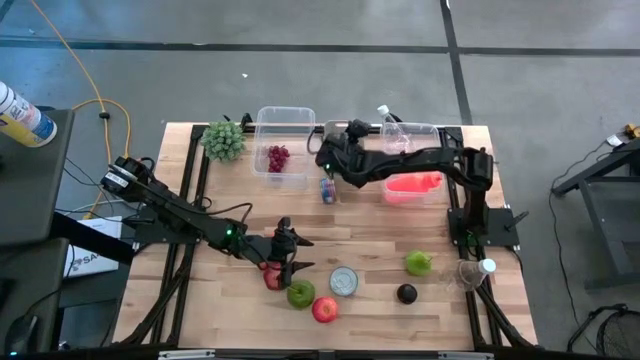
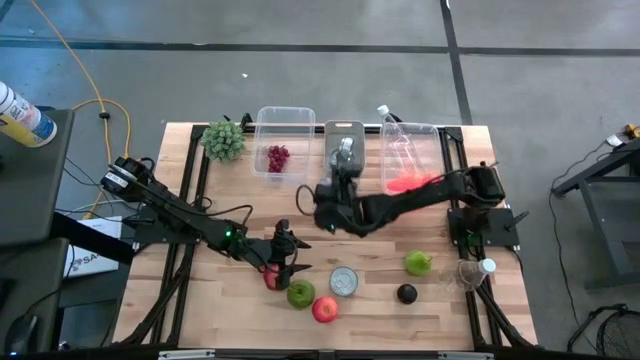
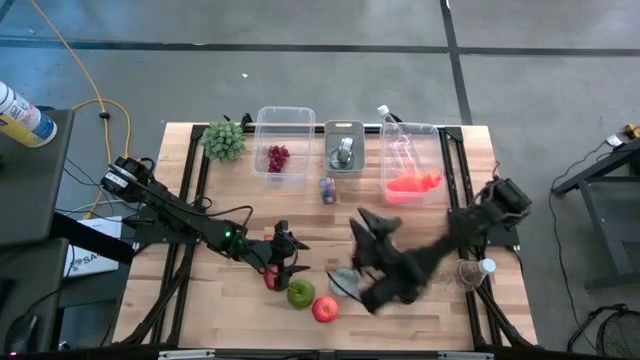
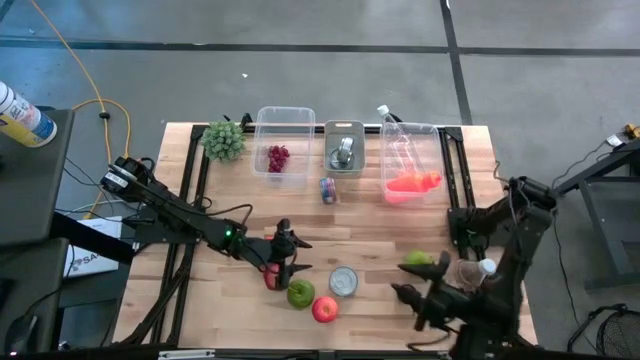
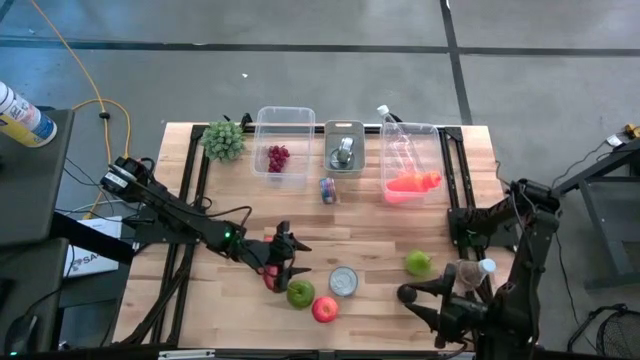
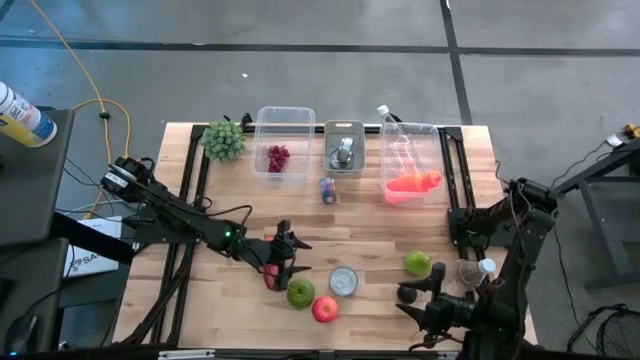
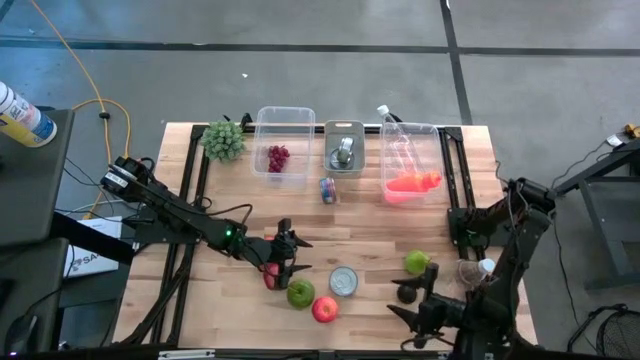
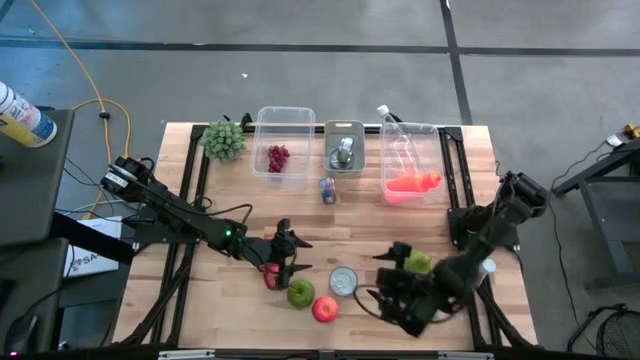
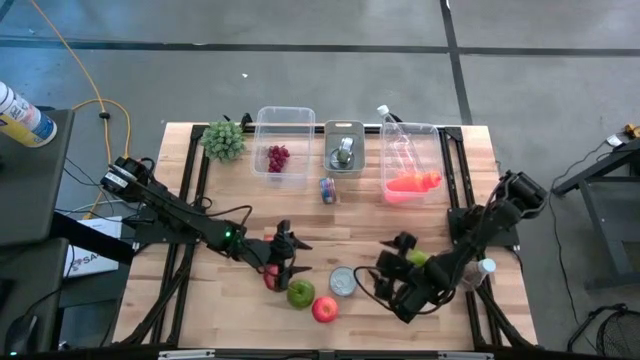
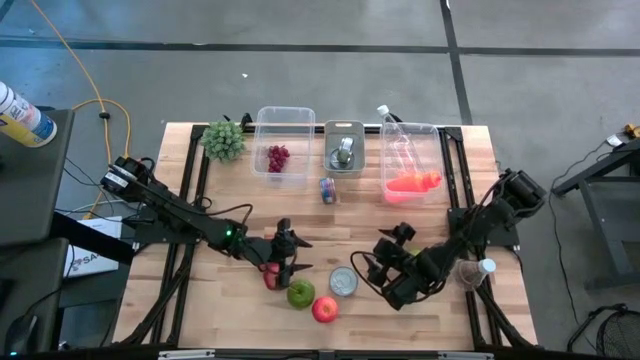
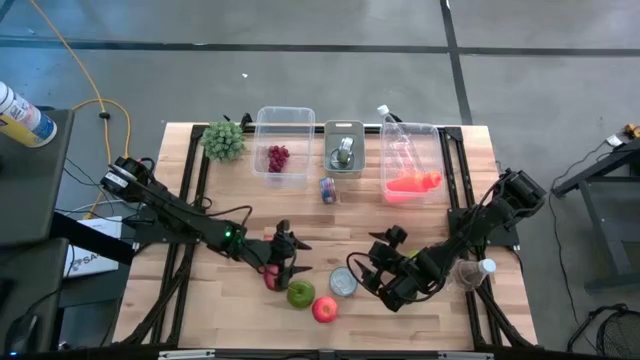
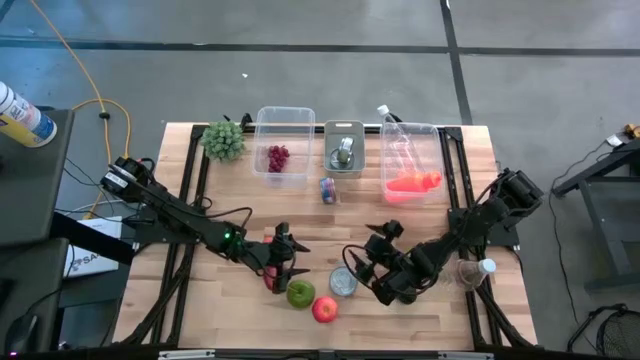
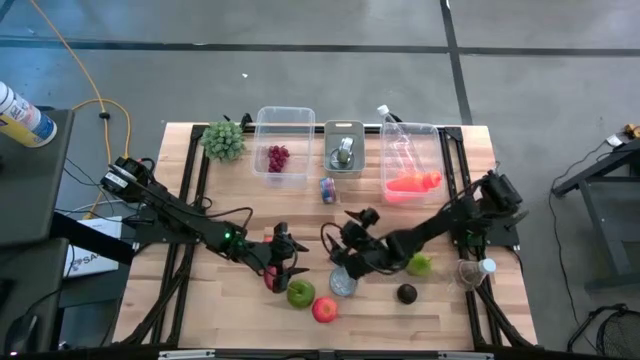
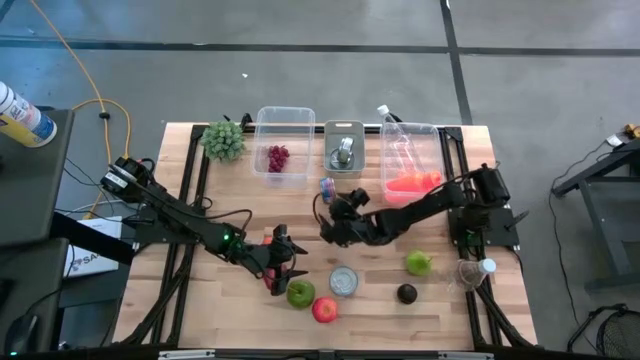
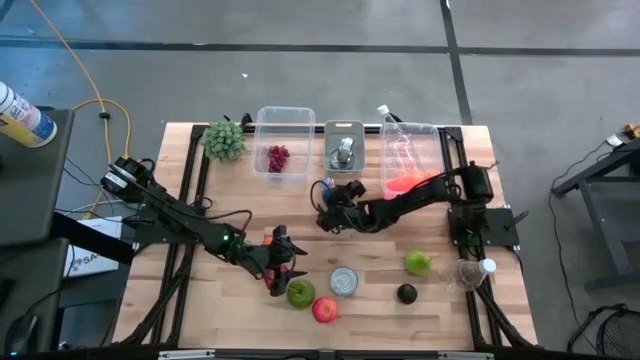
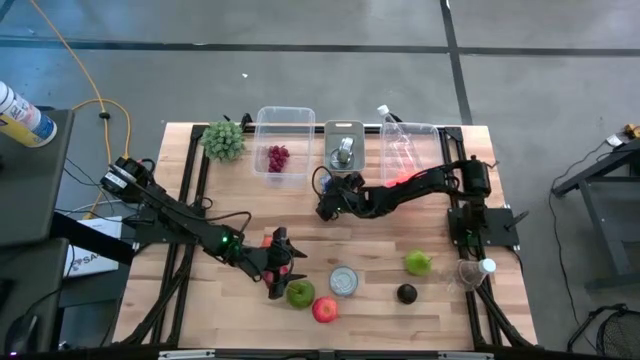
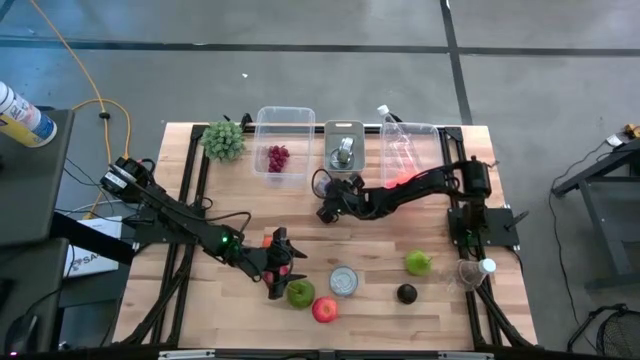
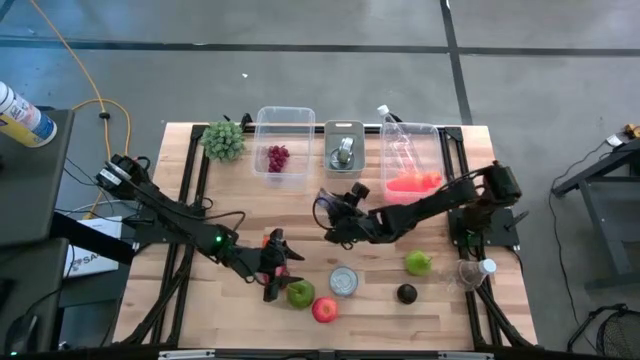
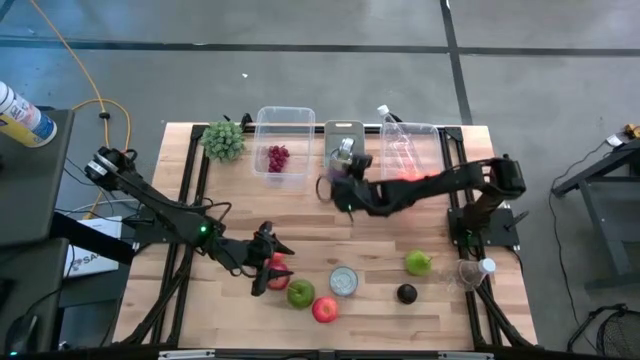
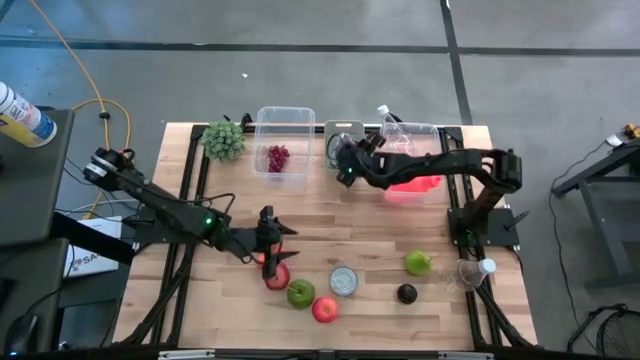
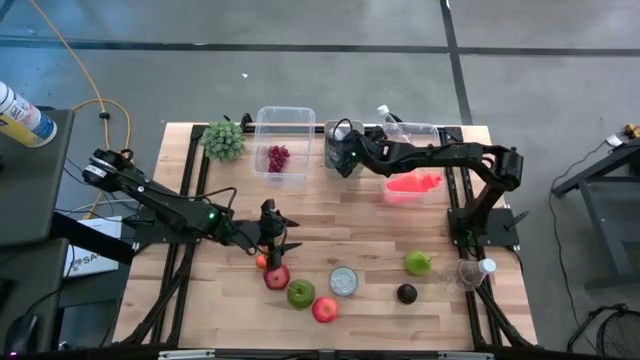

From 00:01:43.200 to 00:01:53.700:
Task: Pick & Place Food Item
Put the blue and pink tuna can into the white bin

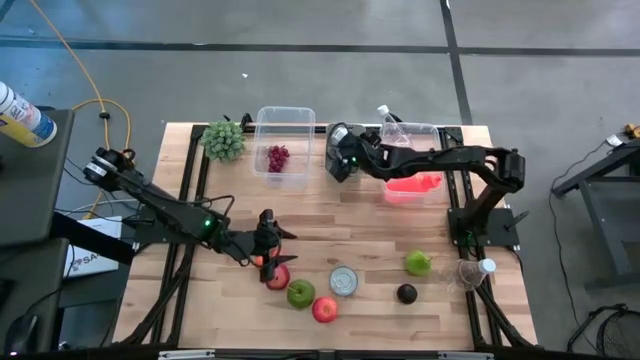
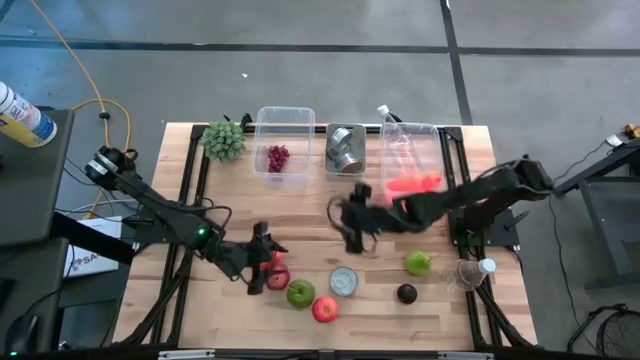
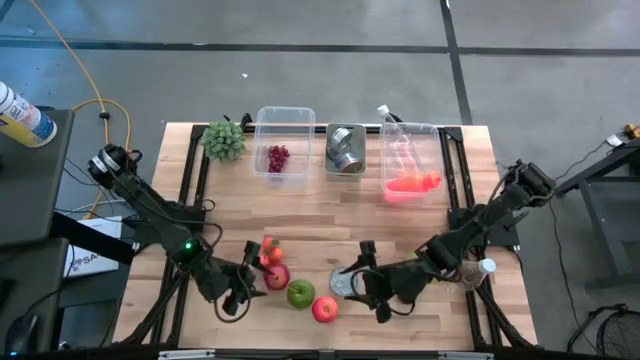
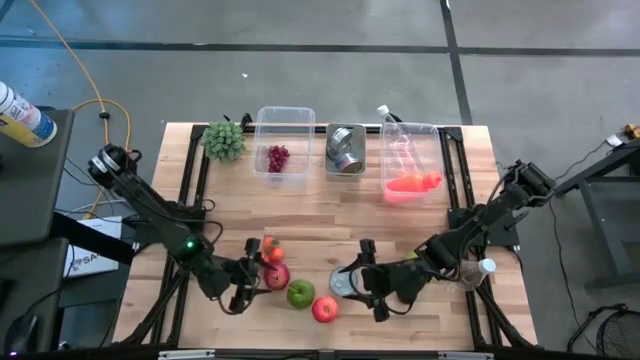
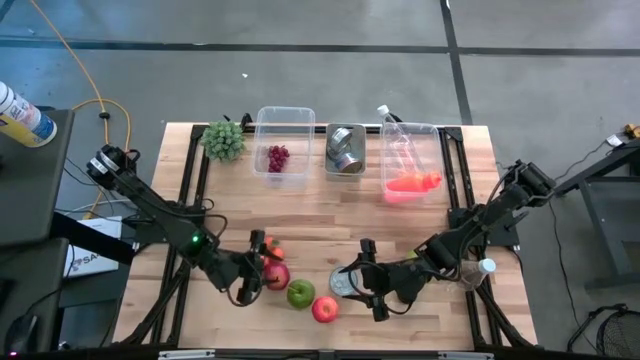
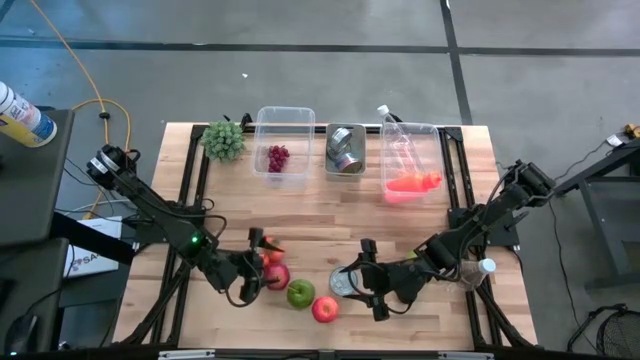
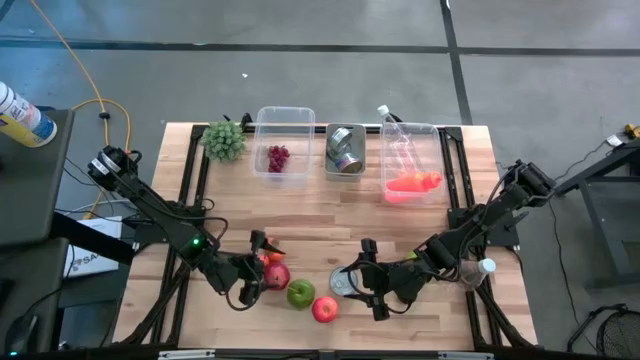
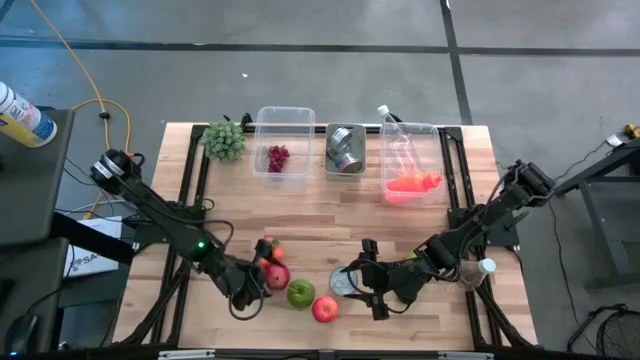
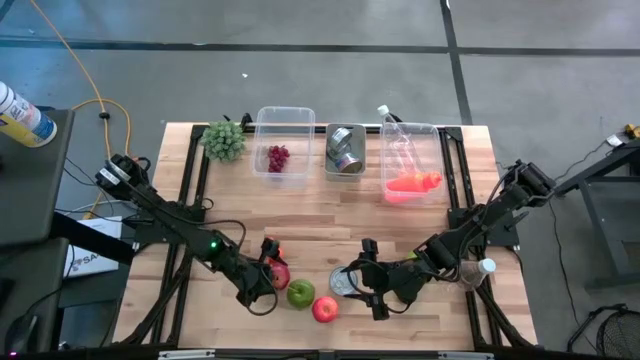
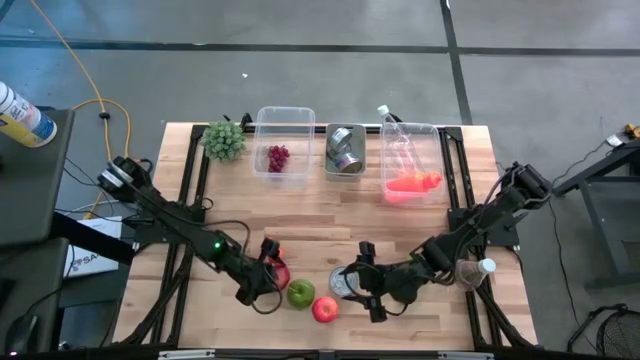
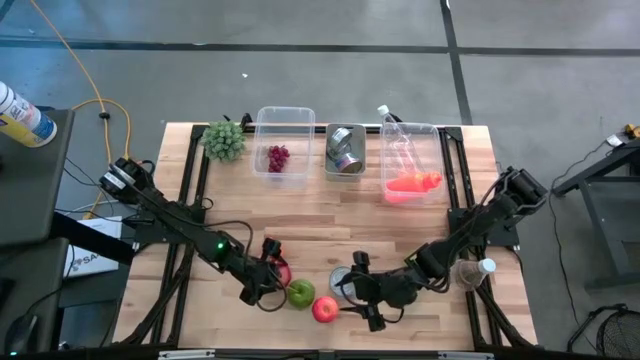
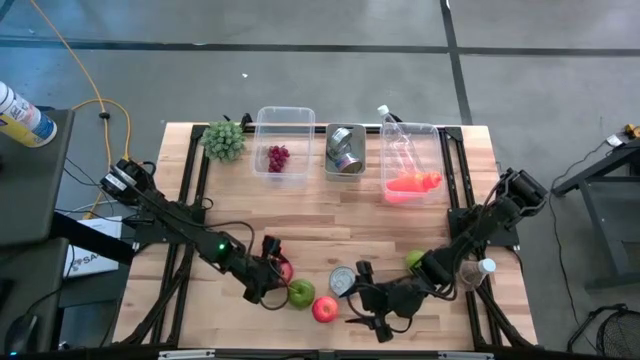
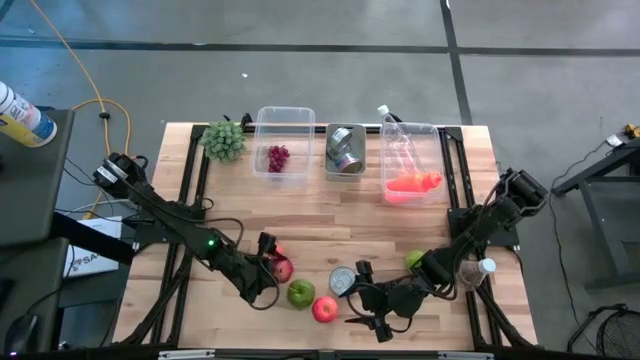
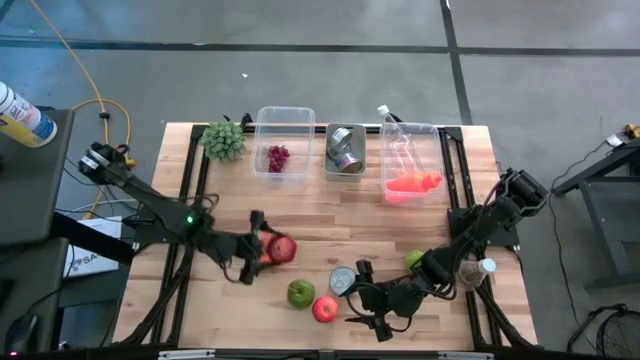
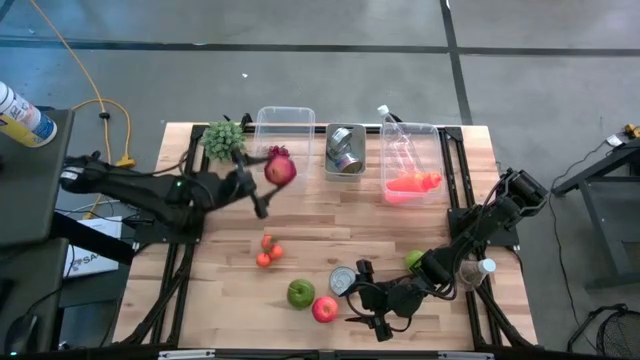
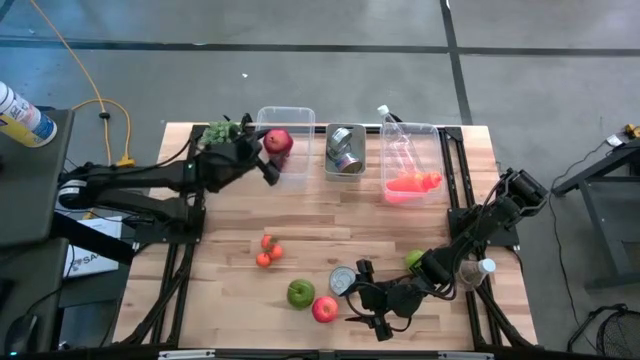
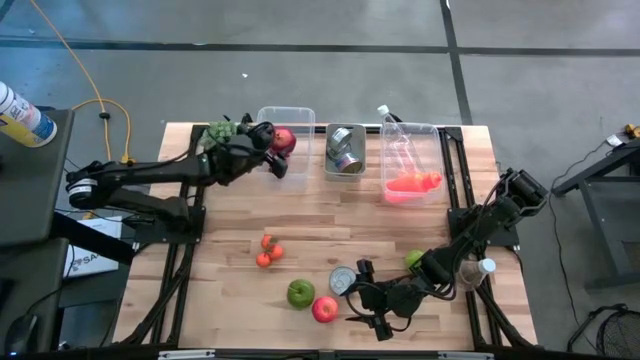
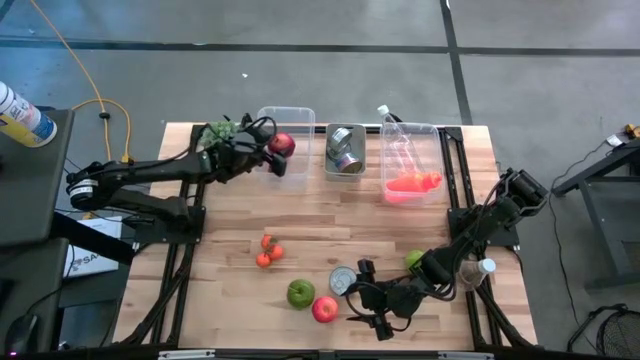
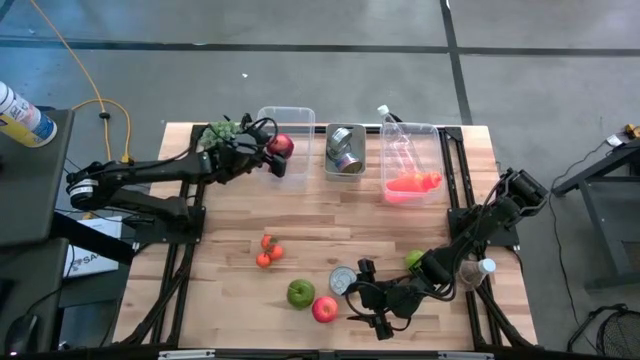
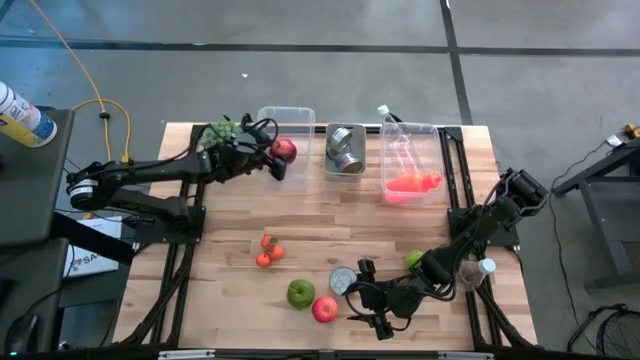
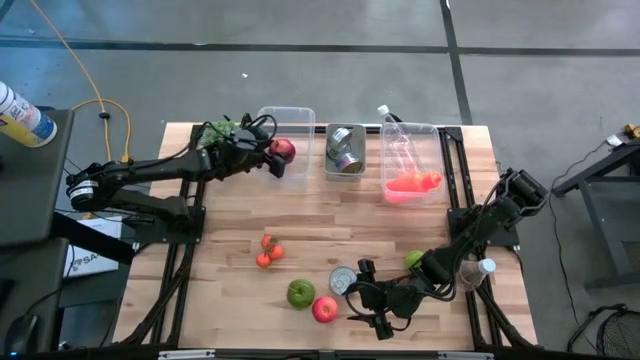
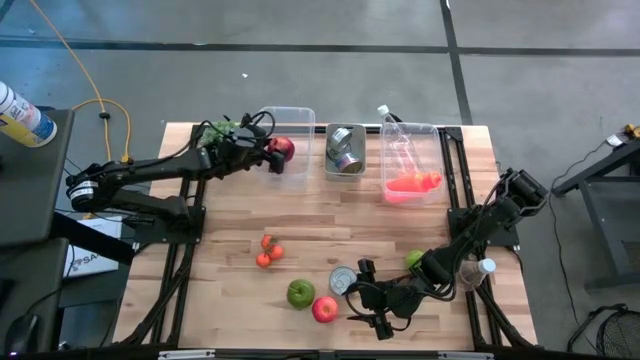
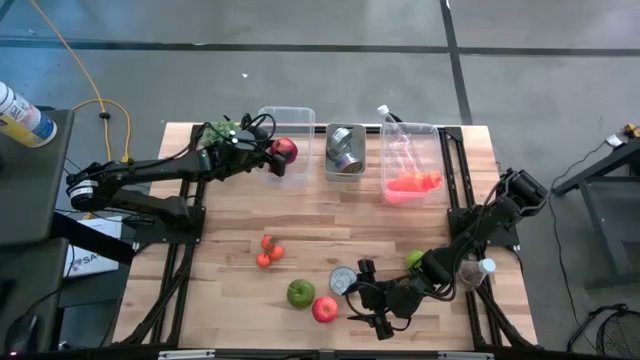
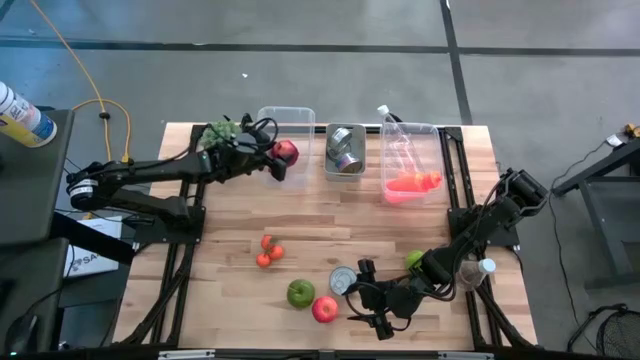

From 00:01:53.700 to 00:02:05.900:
Put the red pomegranate into the left transparent bin
